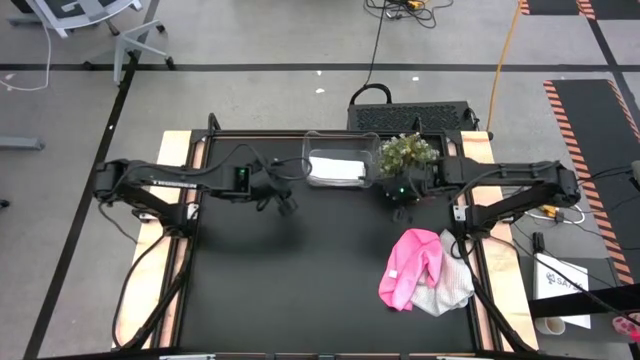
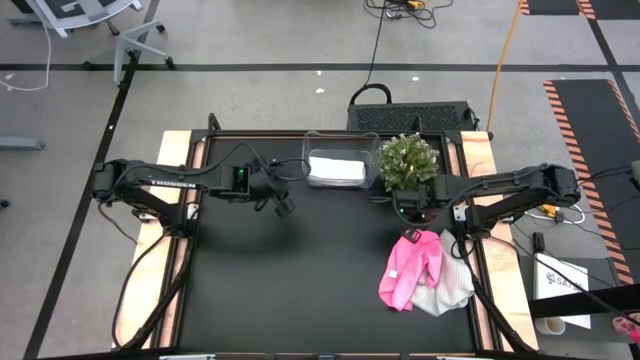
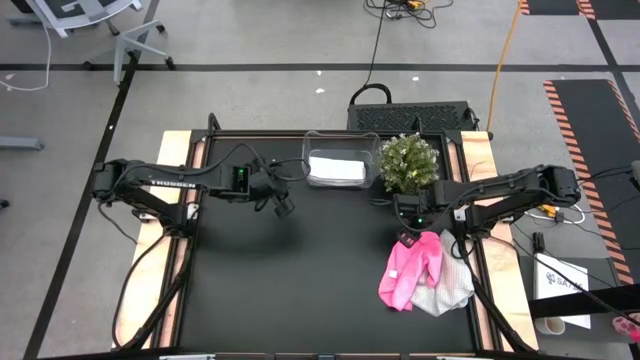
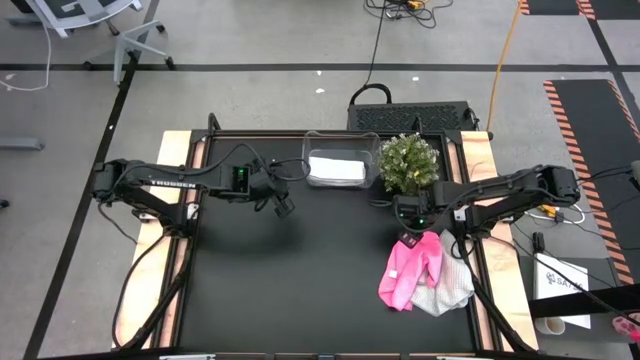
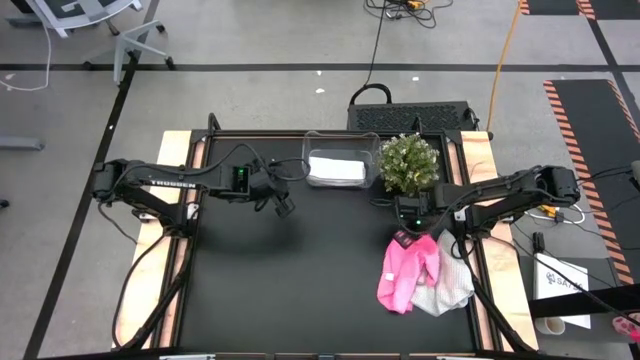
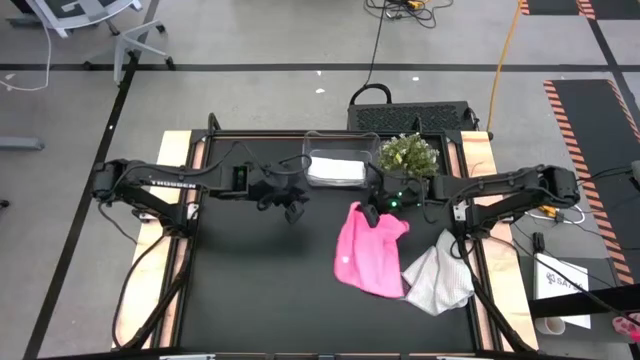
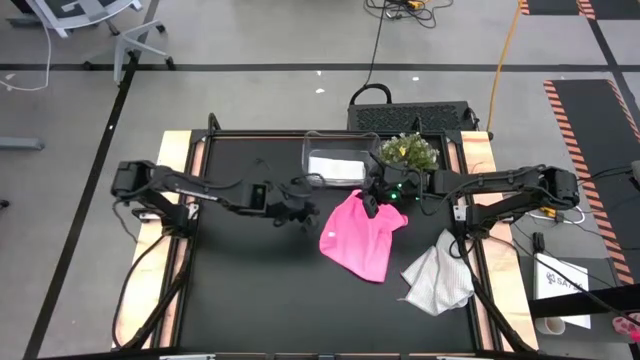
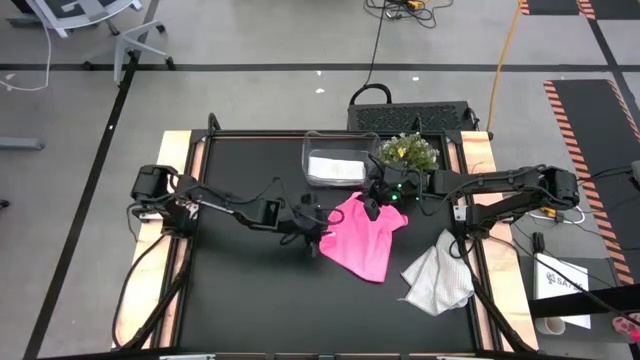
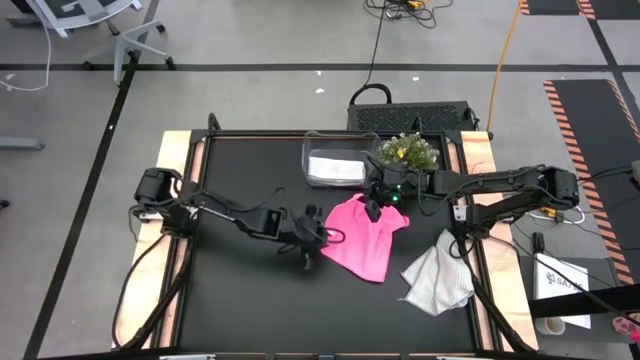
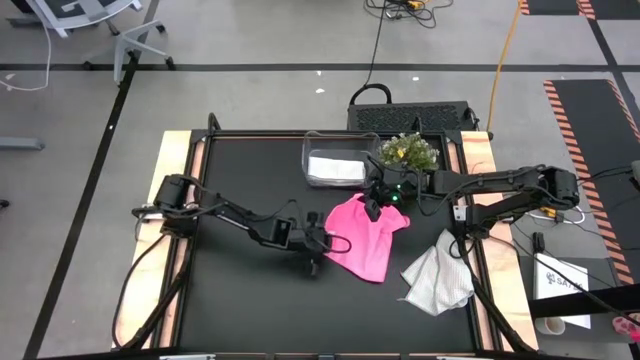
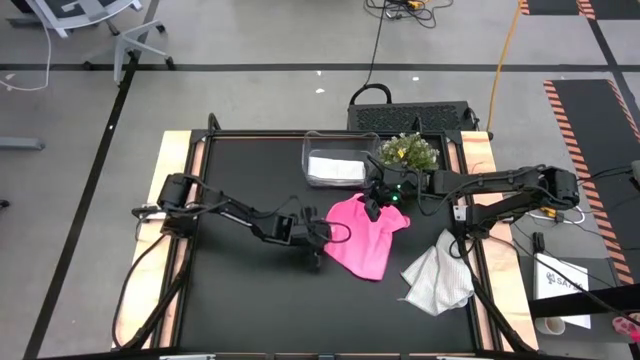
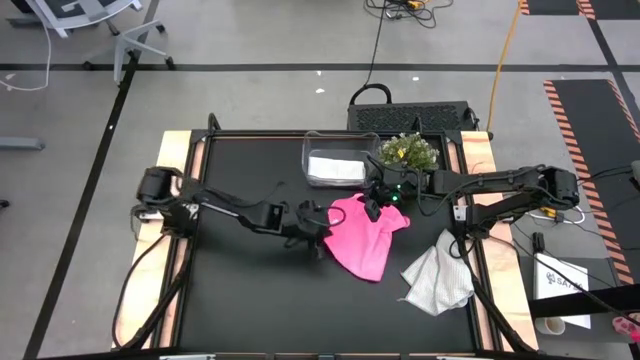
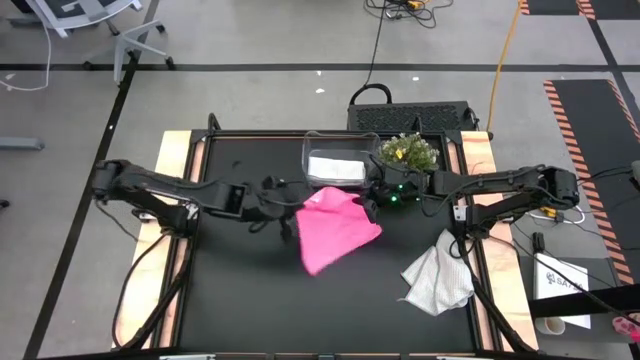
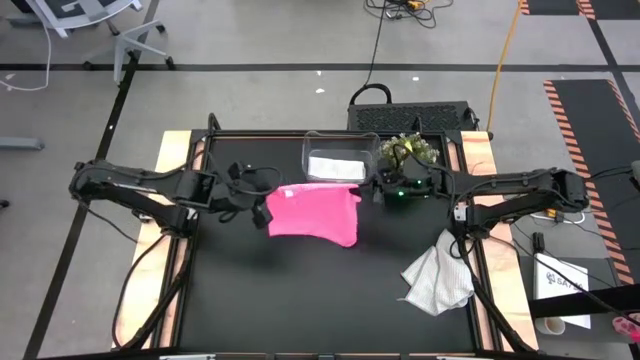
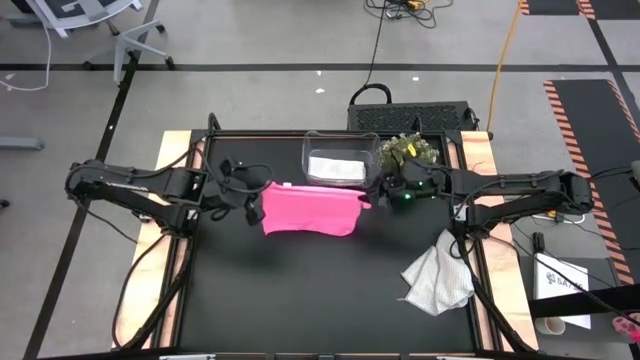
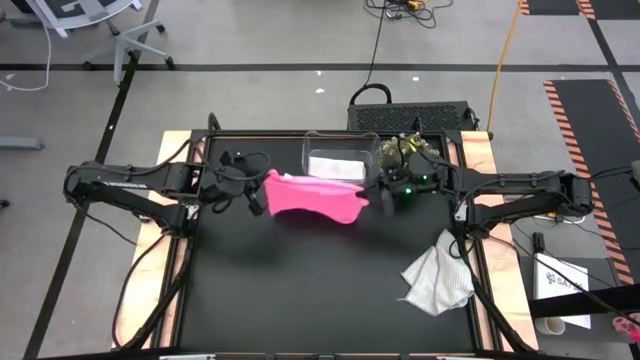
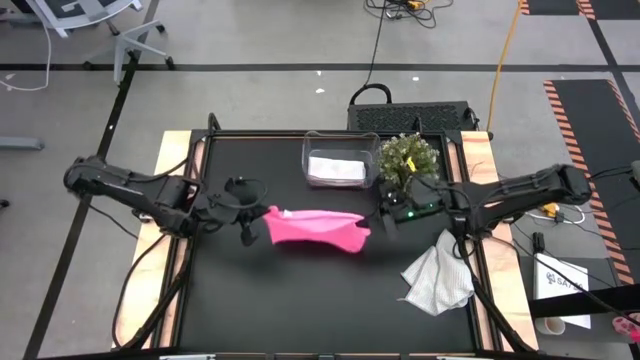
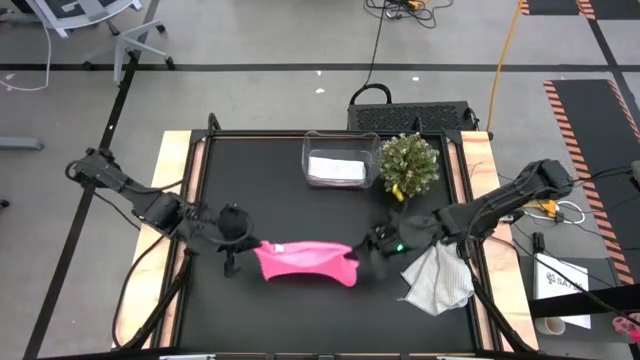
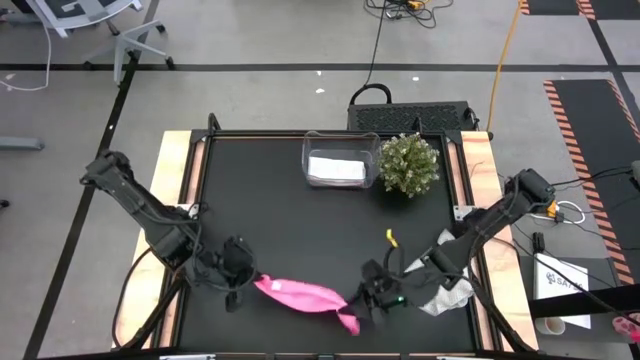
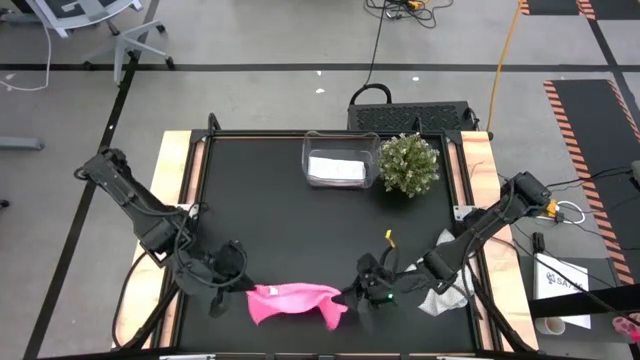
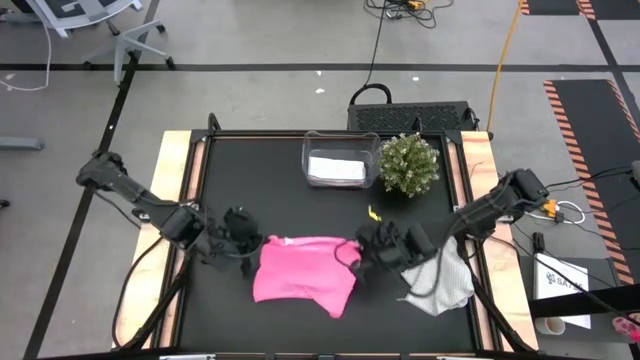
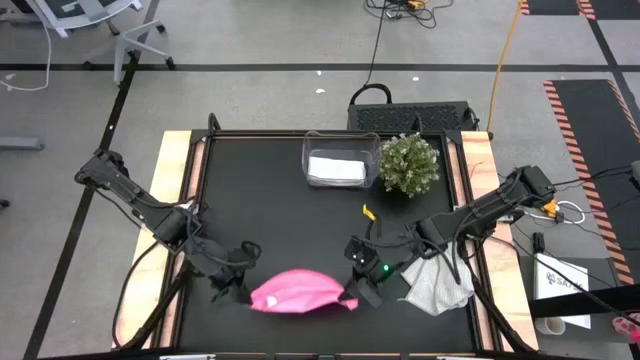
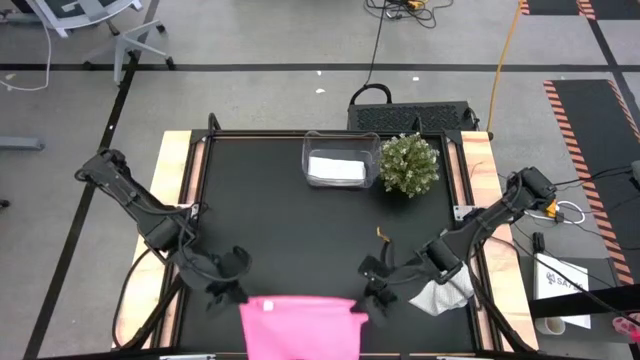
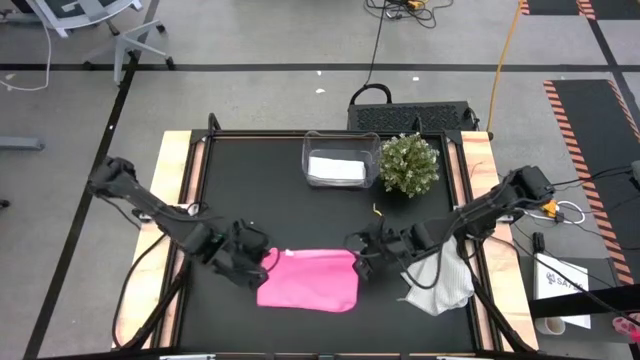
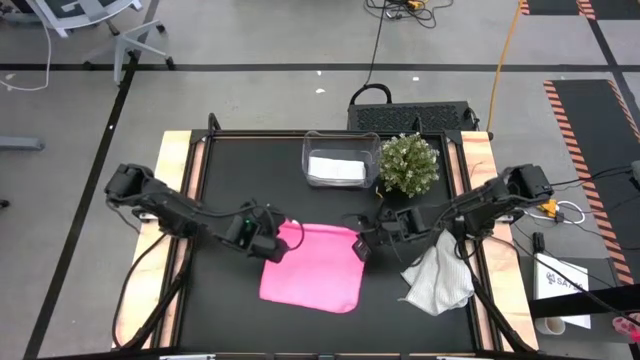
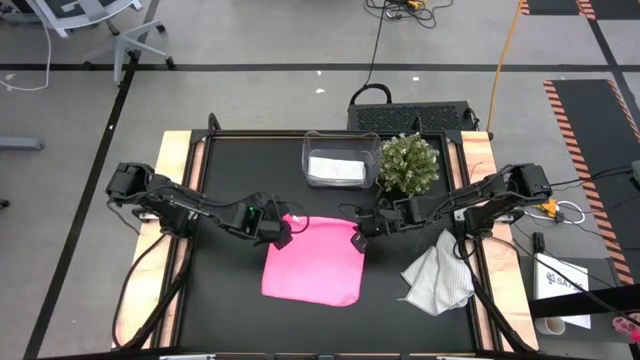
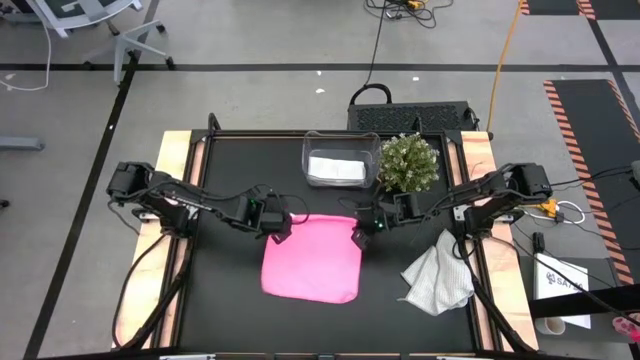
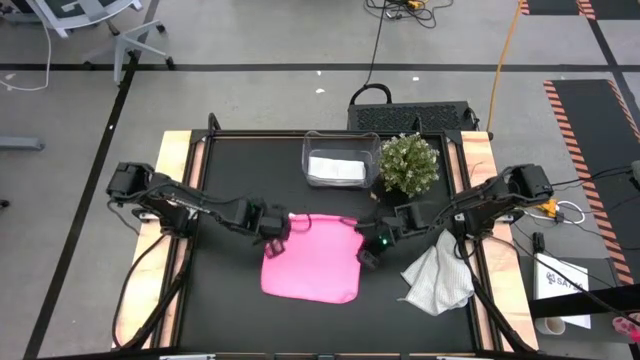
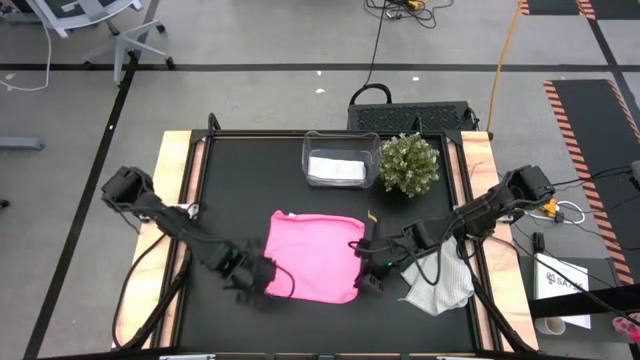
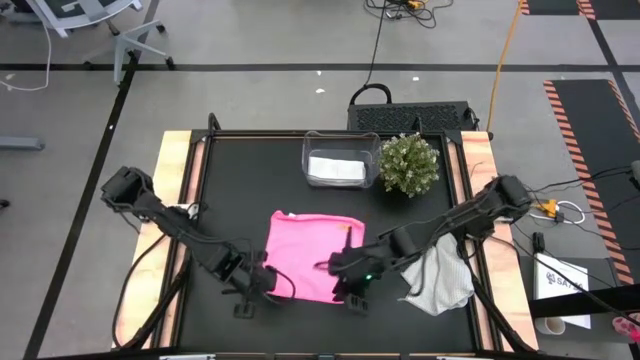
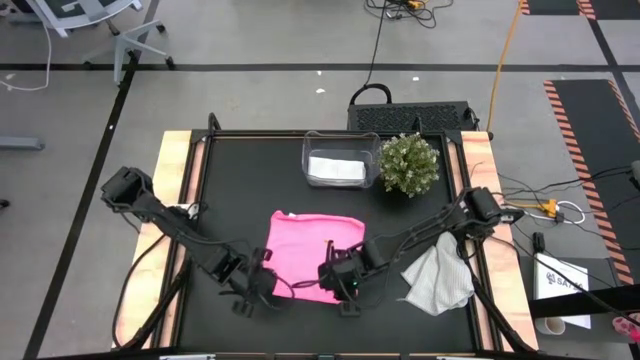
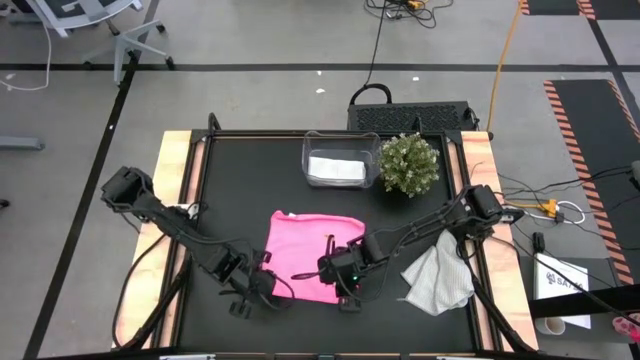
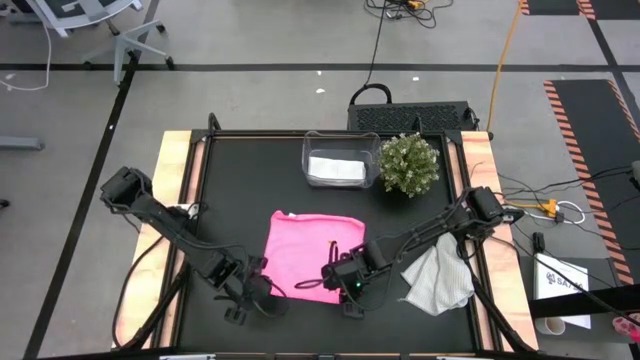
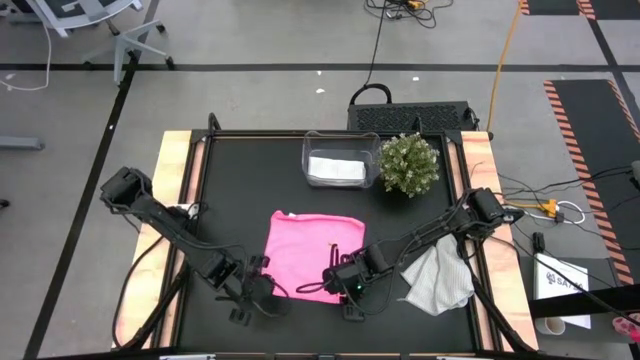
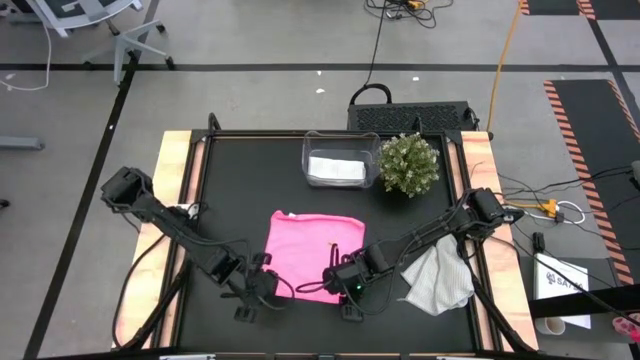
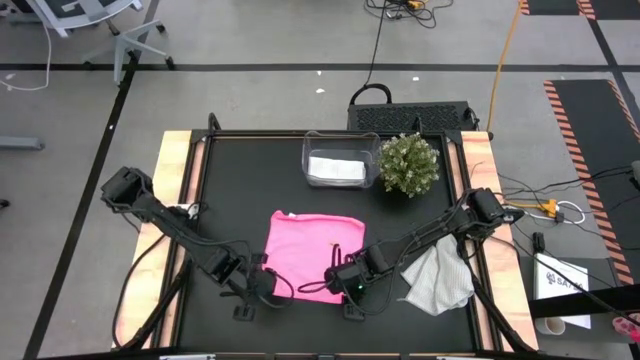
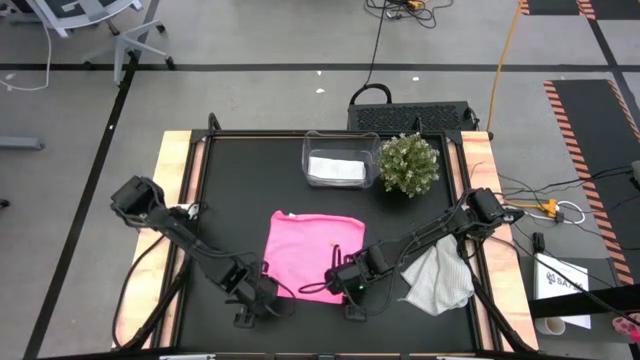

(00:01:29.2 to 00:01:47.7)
Task: Fold microfiber towels
Fold the pink towel

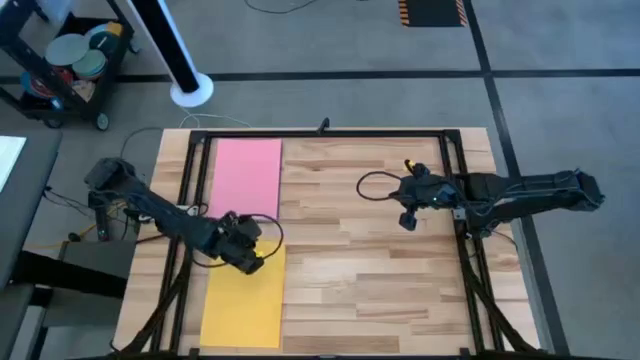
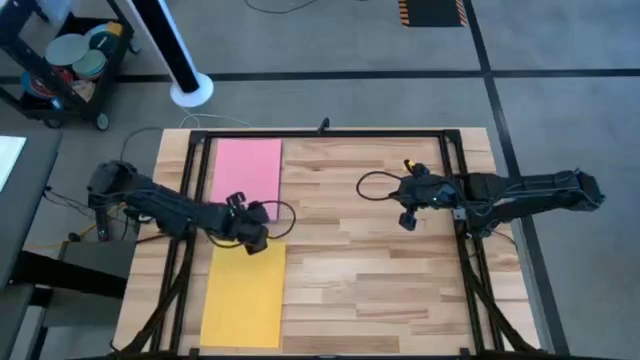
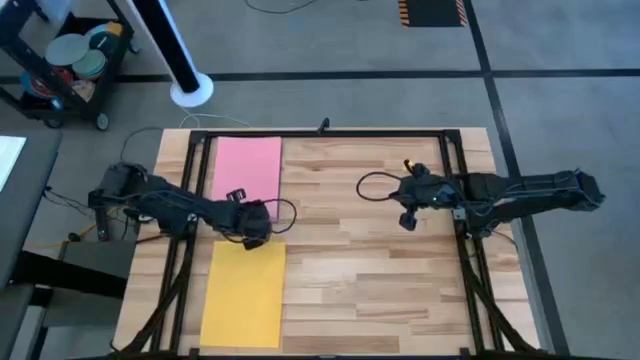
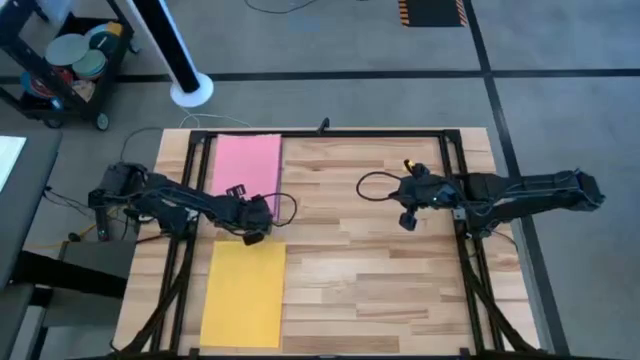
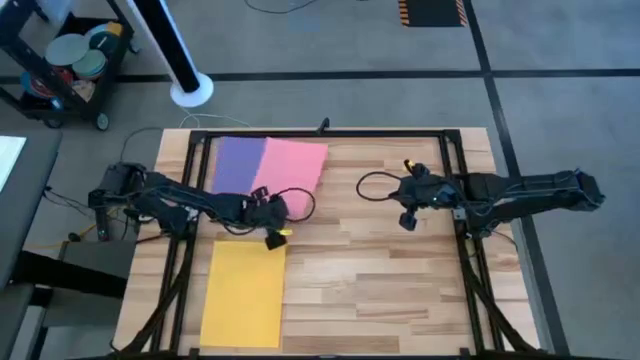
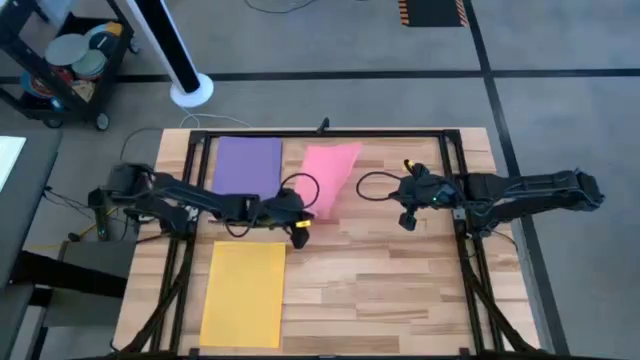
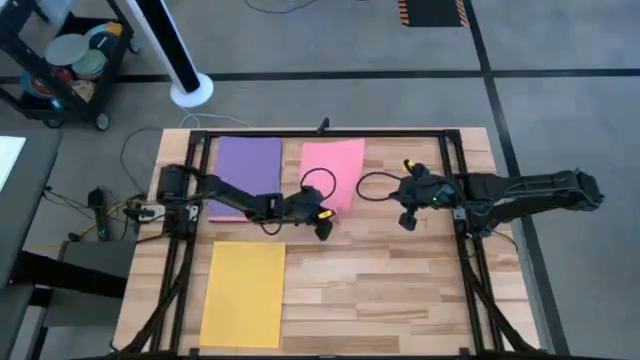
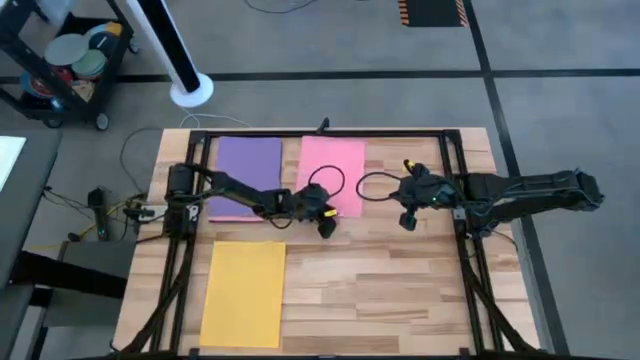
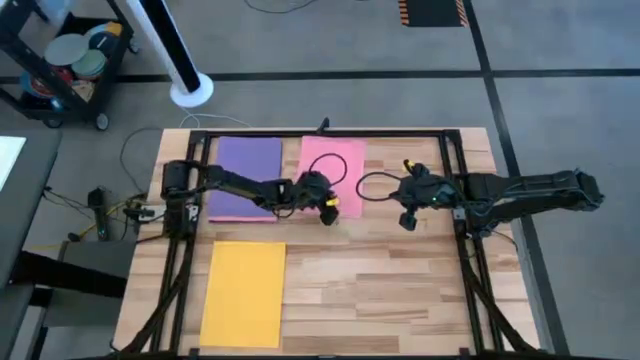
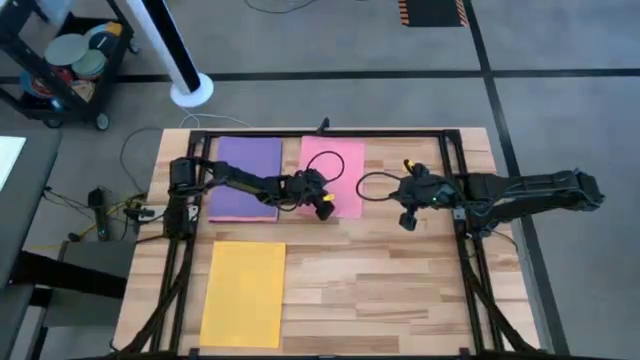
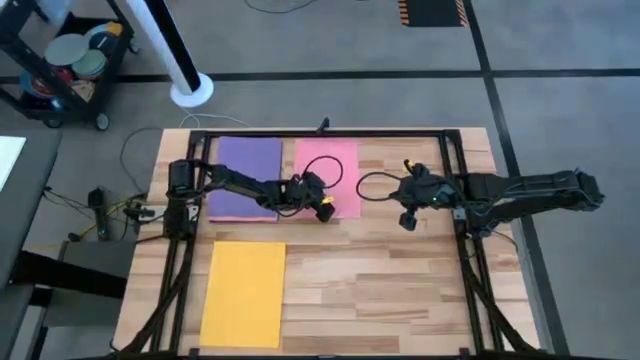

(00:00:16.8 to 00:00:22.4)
Task: Organize paper
Put the pink paper to the top center of the table
